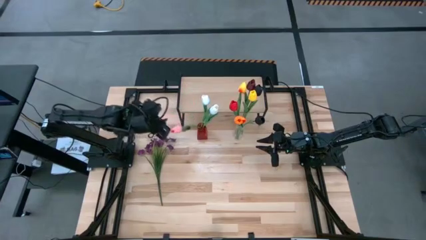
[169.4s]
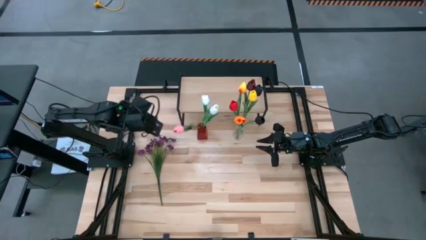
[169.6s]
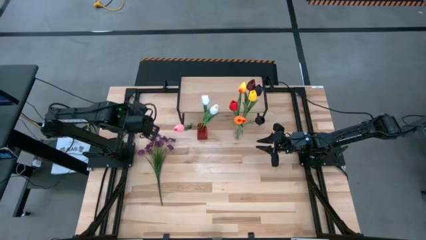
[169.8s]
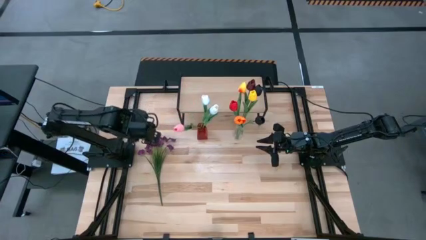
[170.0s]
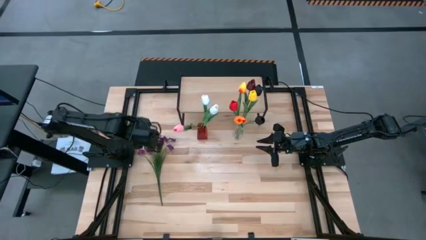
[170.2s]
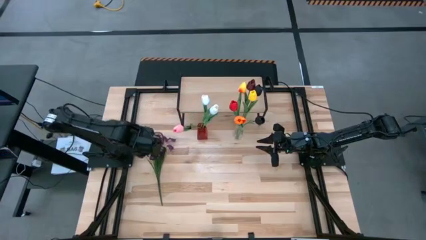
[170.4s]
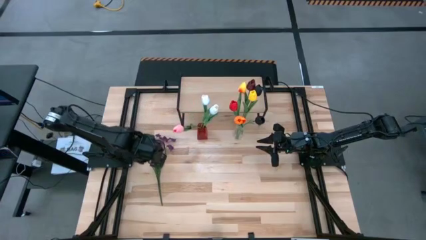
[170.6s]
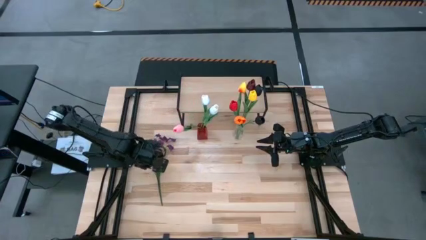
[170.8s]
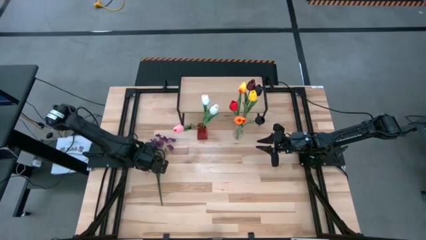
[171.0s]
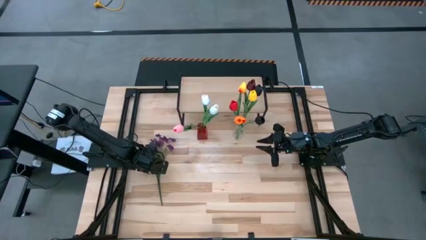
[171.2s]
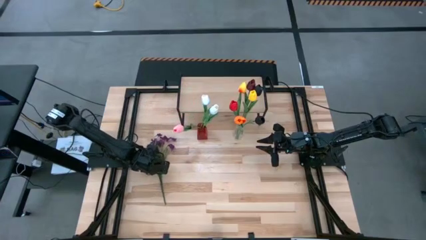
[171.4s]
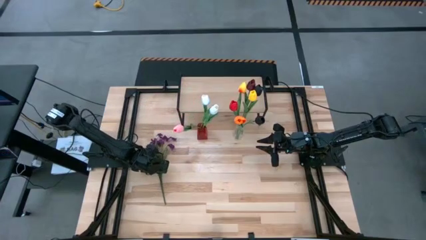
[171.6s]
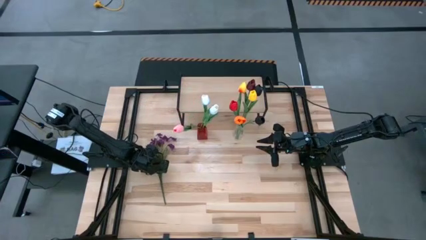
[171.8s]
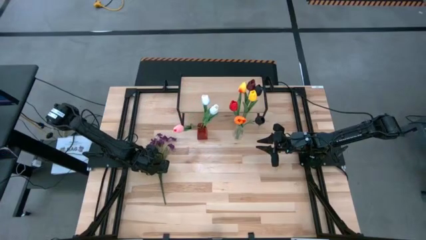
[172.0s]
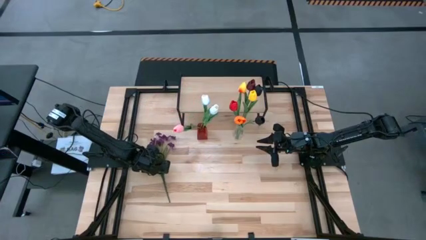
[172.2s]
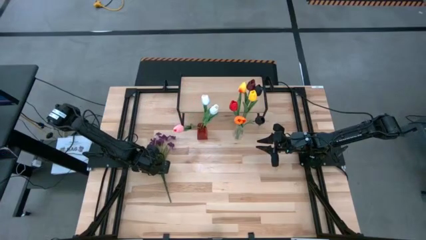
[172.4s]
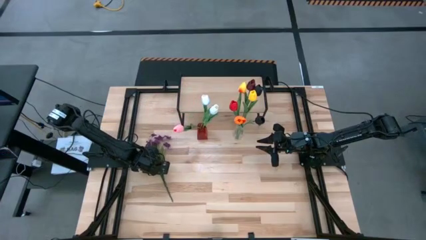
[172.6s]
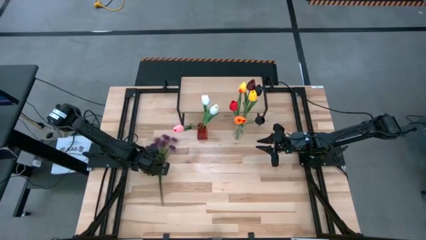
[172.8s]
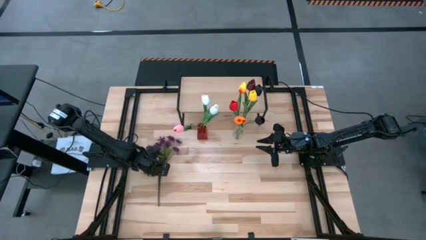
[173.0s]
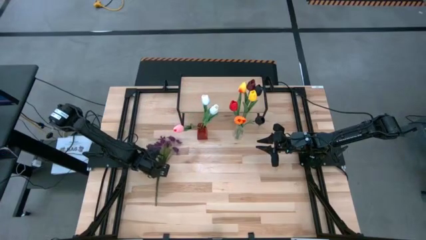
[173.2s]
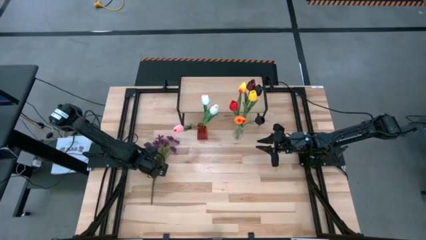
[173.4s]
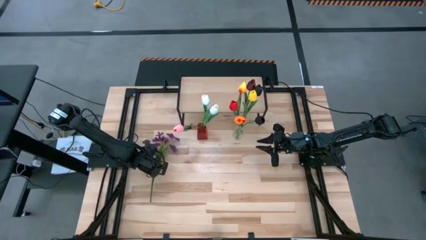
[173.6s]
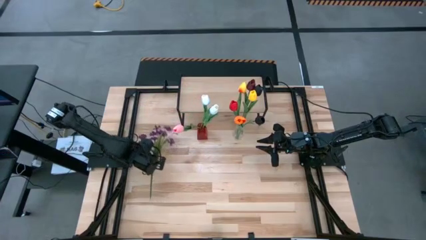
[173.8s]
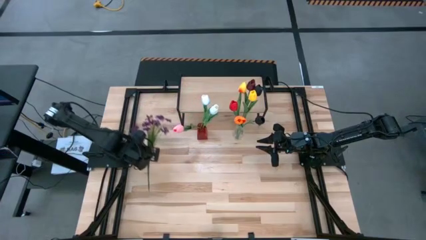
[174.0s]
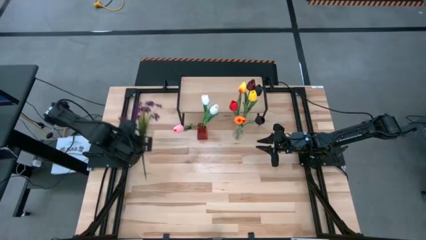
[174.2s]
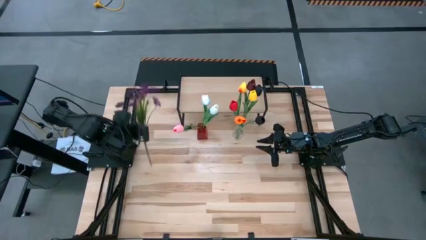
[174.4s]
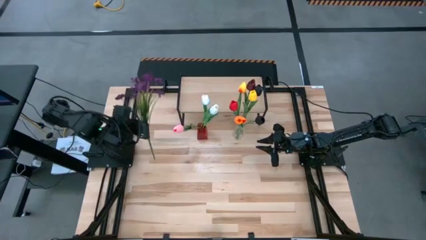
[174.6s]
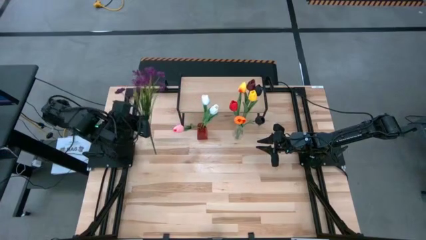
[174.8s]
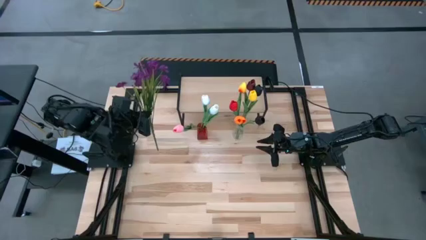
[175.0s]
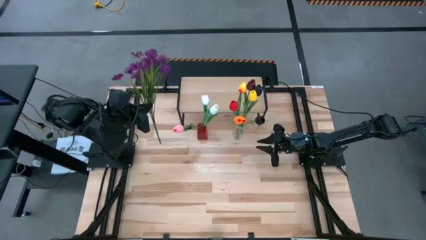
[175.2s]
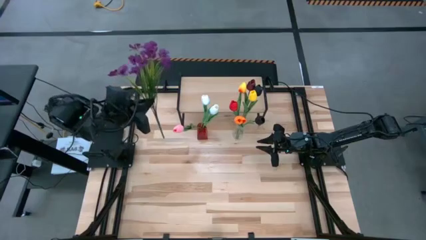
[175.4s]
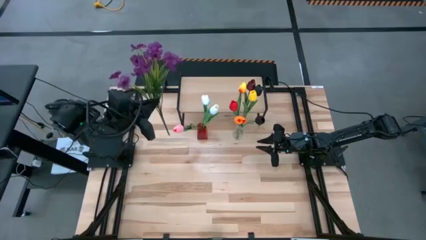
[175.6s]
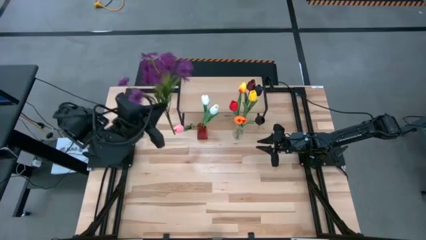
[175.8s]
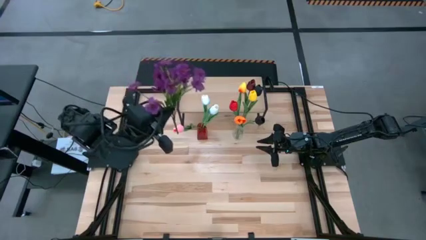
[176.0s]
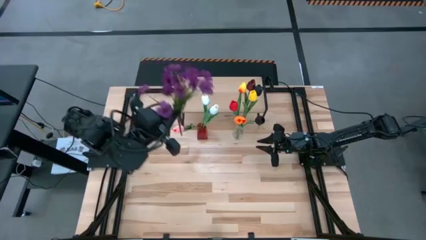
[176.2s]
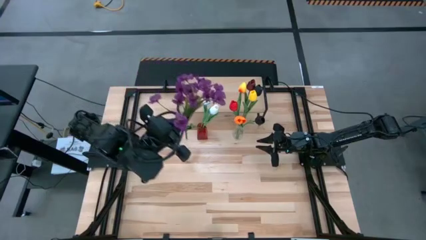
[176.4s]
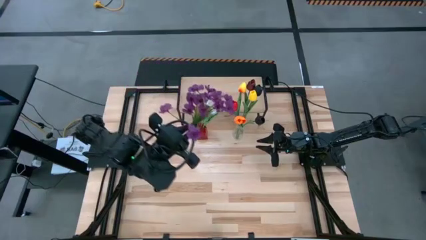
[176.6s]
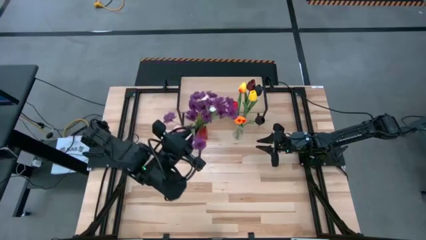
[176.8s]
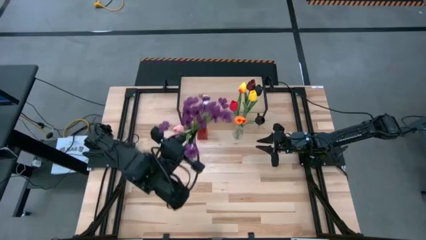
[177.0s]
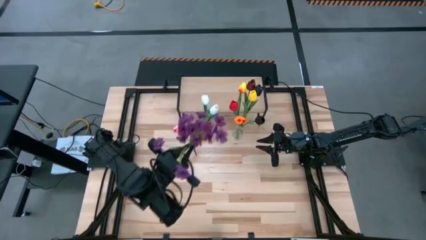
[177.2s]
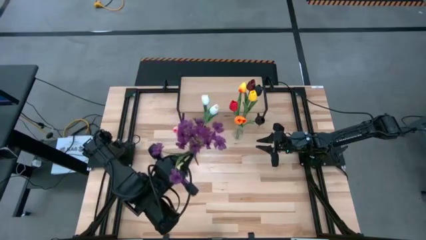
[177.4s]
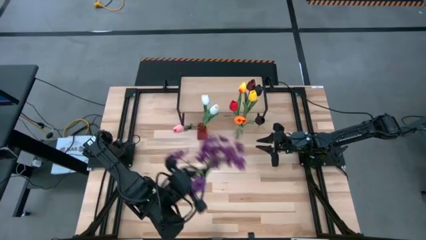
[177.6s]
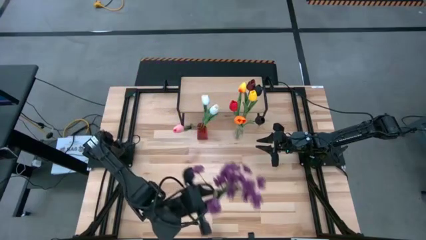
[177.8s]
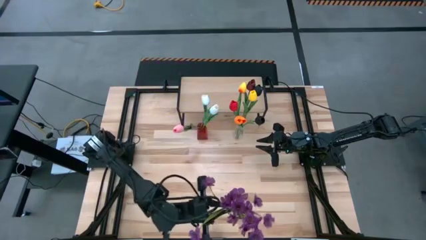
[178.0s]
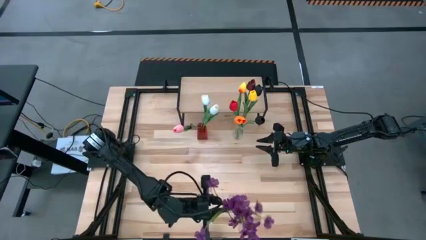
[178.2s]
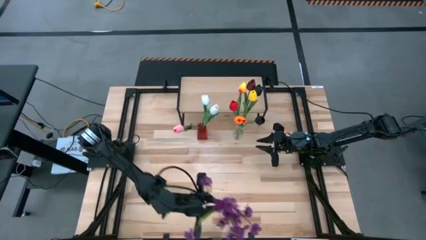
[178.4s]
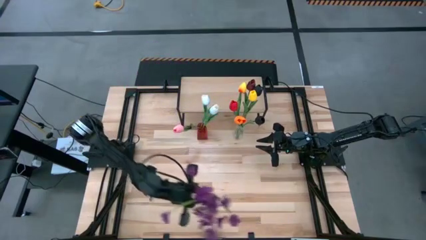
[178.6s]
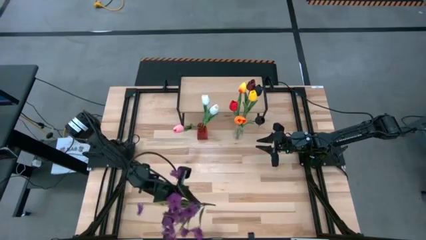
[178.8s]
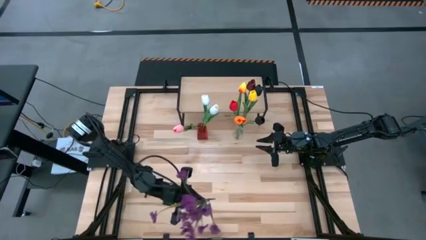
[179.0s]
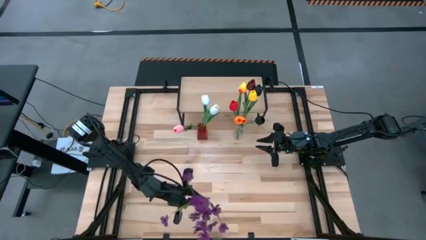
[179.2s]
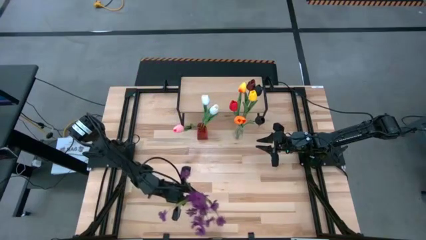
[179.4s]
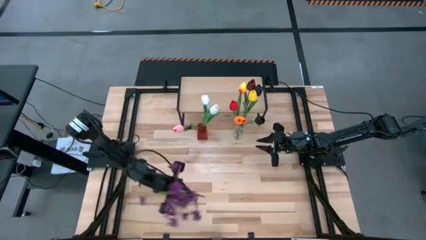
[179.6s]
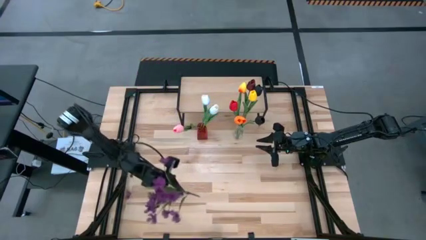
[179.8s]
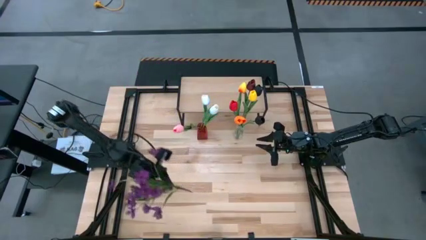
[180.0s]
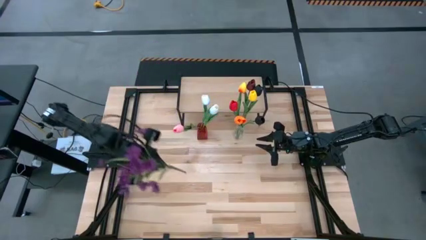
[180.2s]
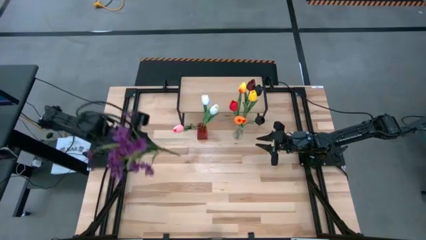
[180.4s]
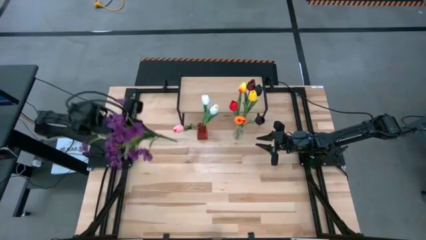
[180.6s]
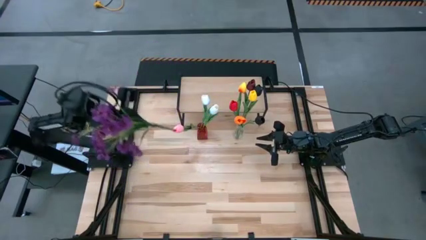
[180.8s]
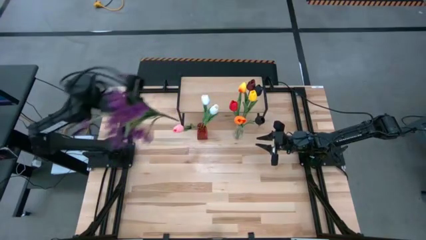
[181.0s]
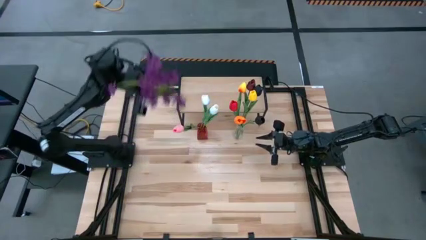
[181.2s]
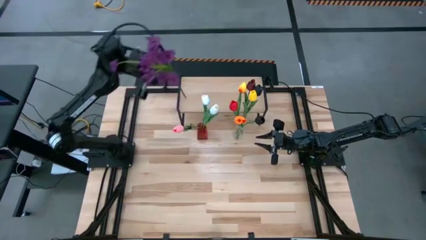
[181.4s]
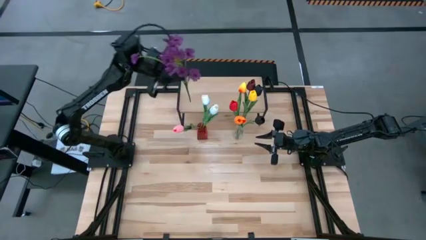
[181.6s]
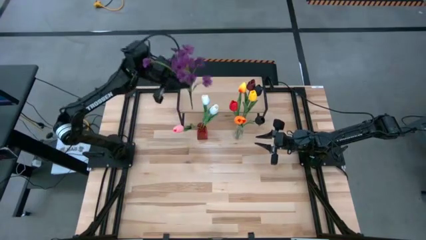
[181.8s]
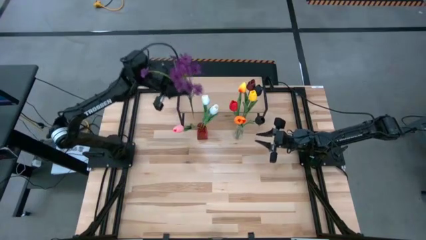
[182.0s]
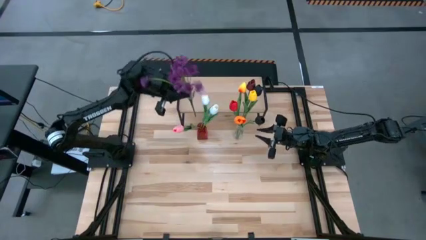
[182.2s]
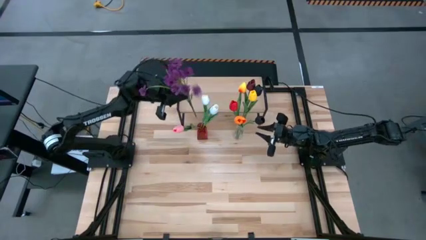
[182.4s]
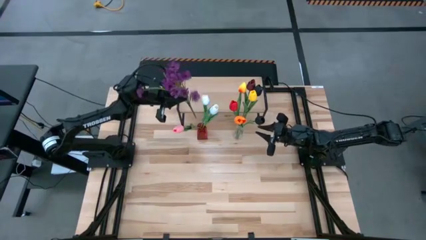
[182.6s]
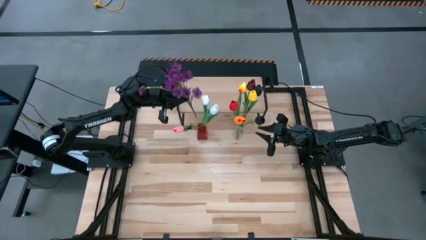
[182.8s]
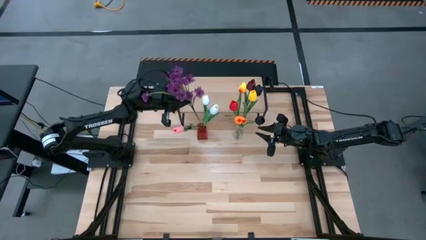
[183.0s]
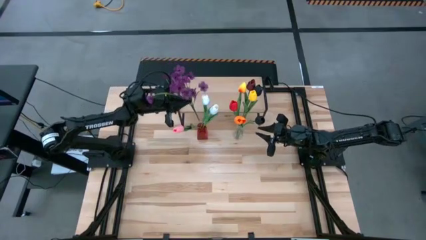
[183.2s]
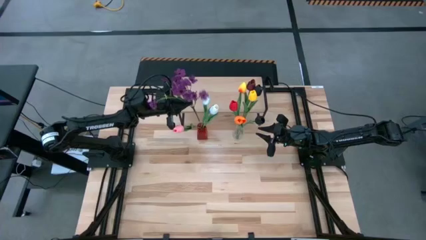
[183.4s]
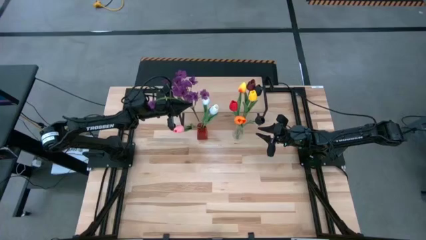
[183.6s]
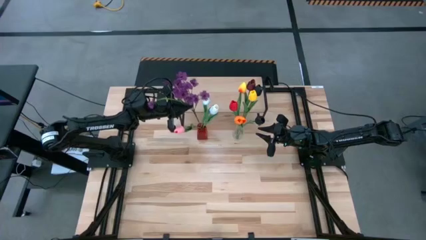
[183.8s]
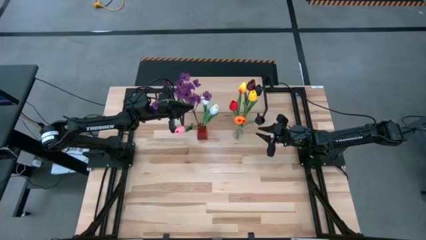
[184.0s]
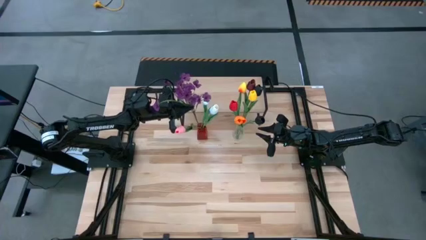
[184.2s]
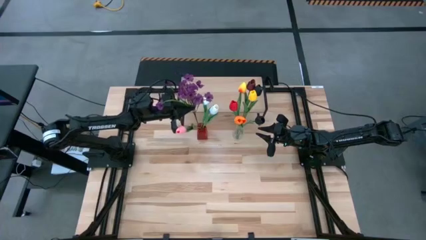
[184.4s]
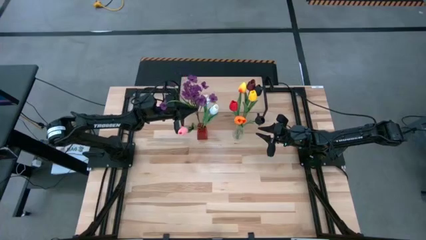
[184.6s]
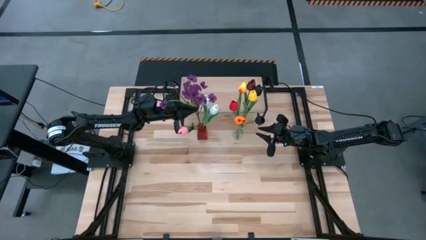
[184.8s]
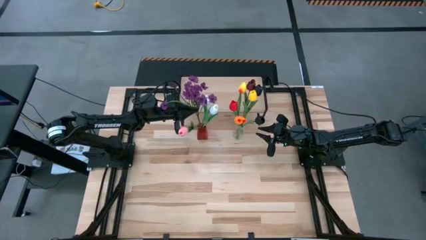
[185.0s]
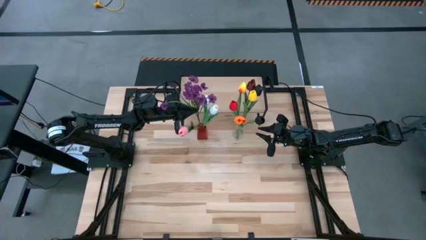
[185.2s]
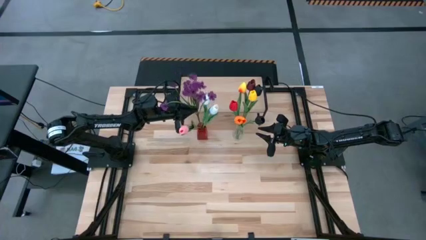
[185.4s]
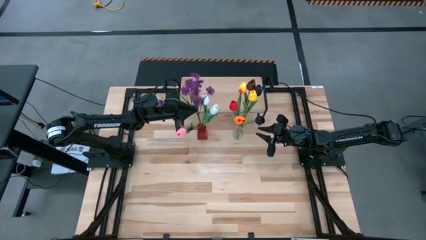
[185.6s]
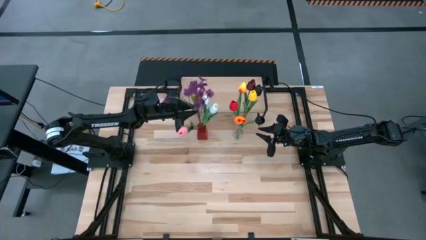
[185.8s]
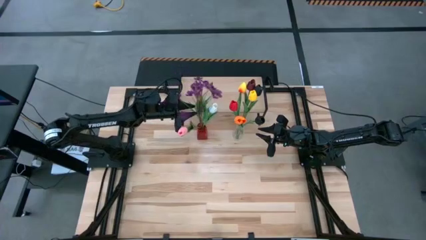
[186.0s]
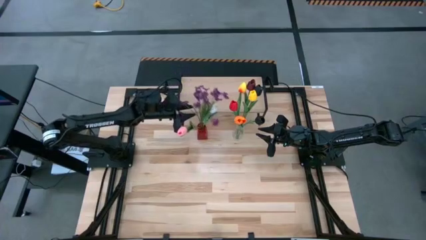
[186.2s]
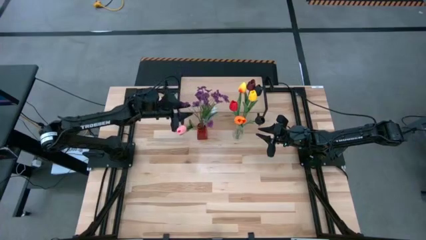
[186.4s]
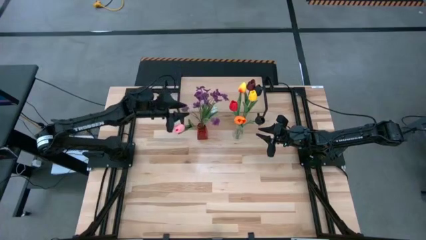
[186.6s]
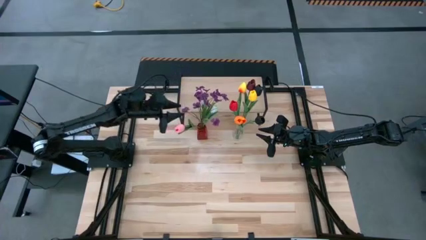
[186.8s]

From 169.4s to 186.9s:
Task: Pick and place flowers into a vace then onto a shelf
Put the violet flowers into the red vase
